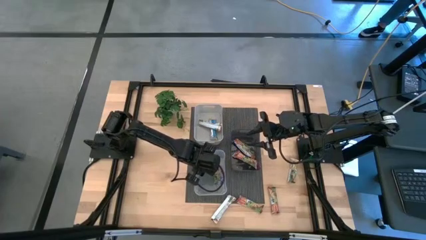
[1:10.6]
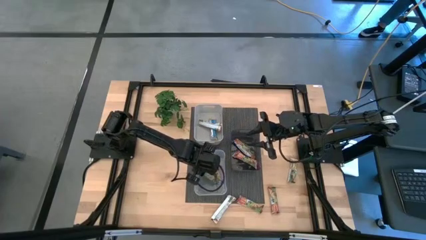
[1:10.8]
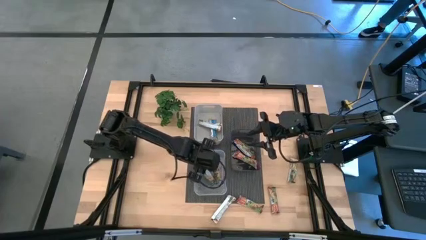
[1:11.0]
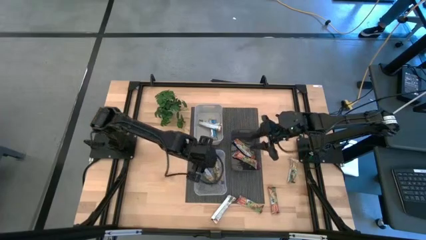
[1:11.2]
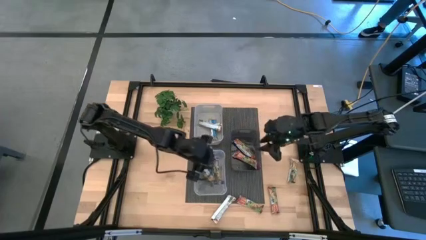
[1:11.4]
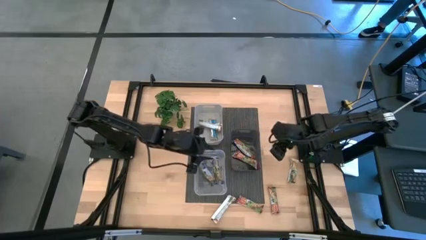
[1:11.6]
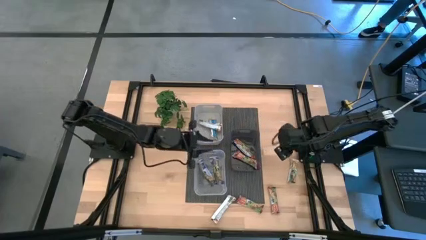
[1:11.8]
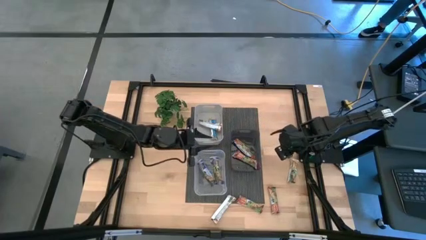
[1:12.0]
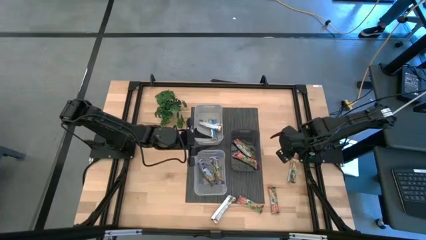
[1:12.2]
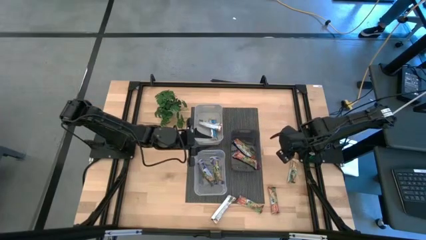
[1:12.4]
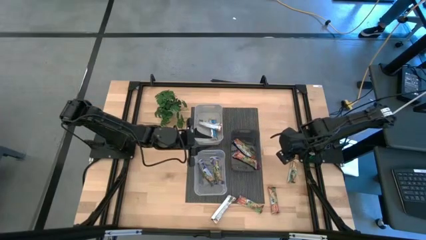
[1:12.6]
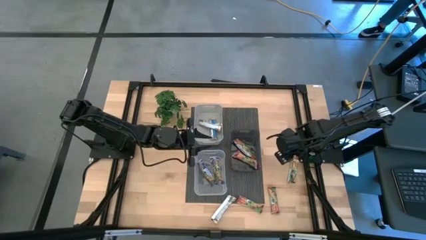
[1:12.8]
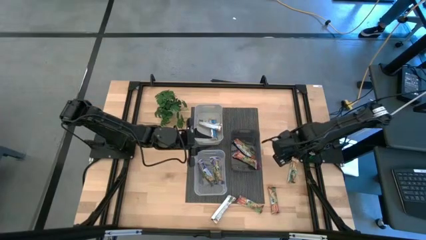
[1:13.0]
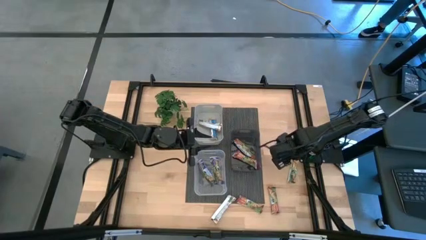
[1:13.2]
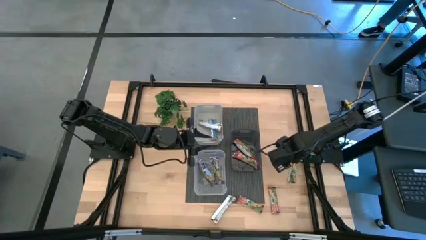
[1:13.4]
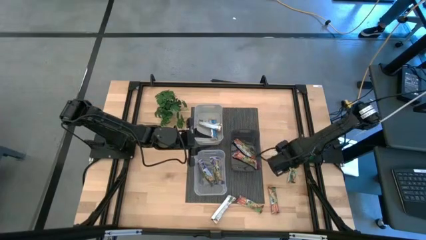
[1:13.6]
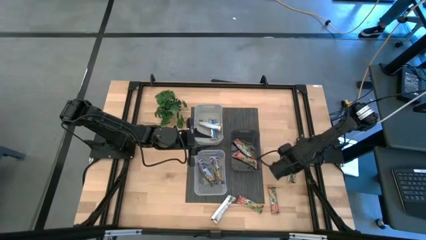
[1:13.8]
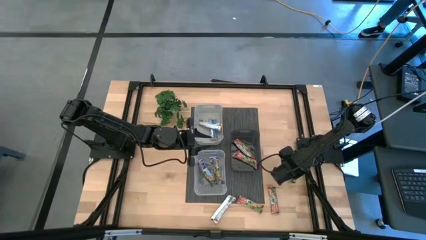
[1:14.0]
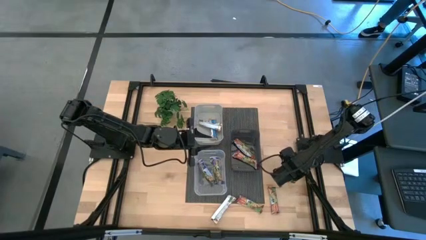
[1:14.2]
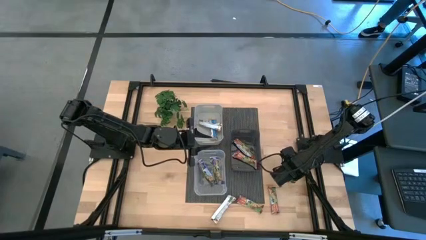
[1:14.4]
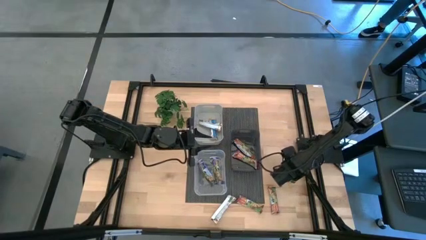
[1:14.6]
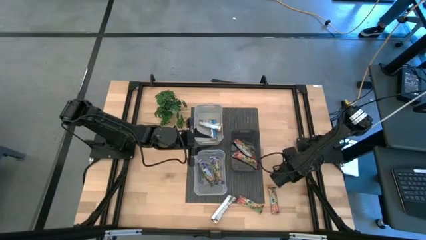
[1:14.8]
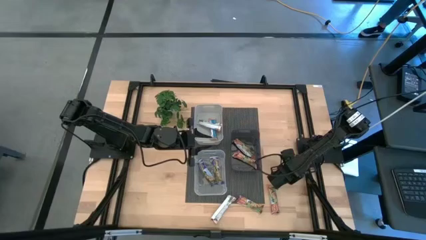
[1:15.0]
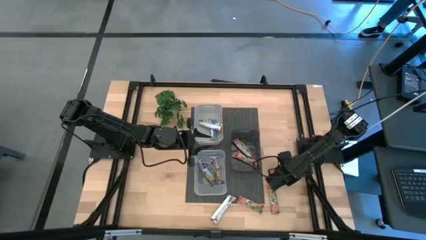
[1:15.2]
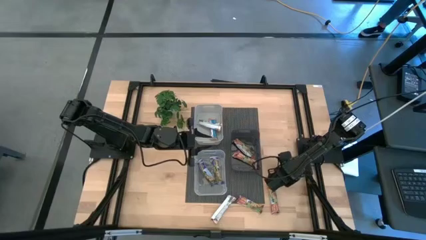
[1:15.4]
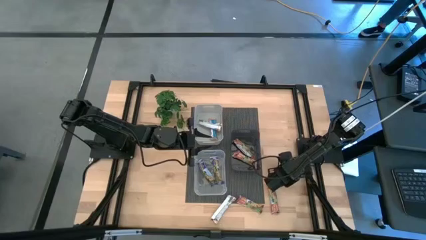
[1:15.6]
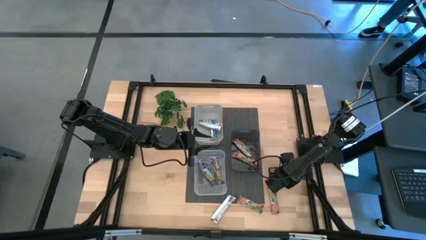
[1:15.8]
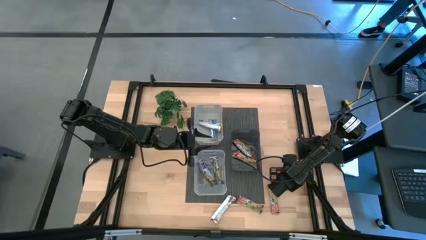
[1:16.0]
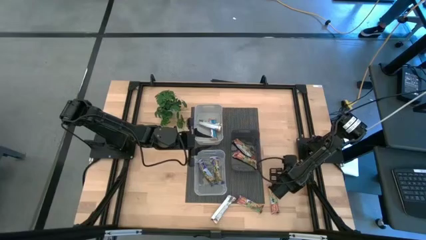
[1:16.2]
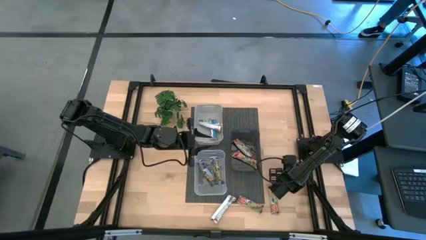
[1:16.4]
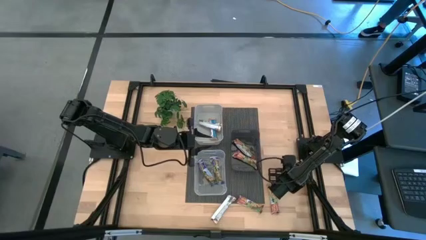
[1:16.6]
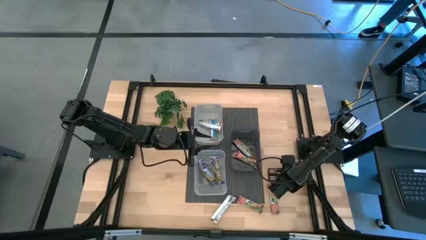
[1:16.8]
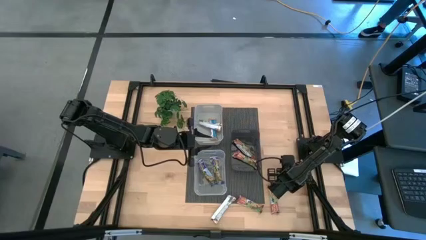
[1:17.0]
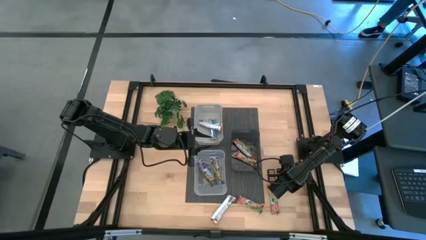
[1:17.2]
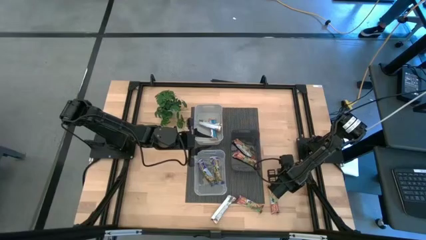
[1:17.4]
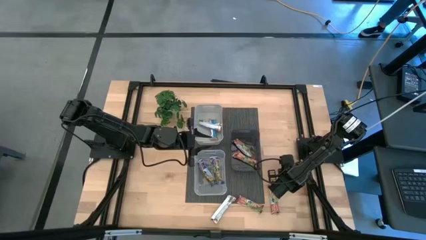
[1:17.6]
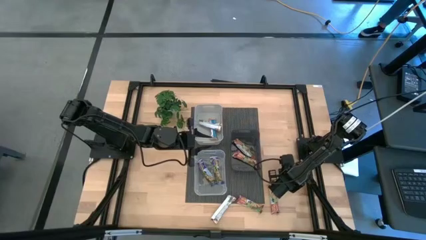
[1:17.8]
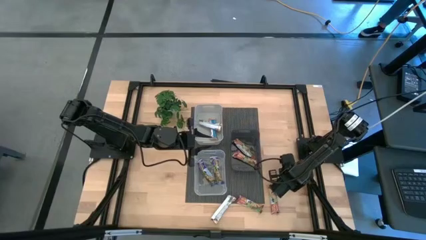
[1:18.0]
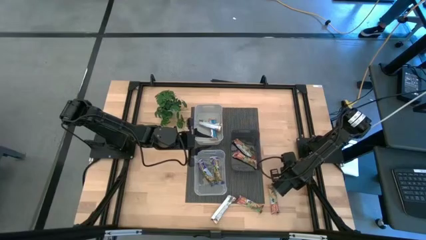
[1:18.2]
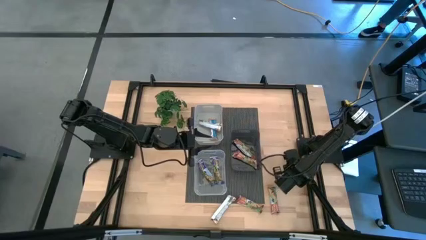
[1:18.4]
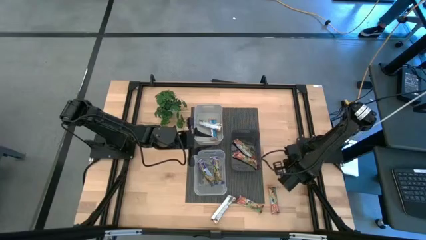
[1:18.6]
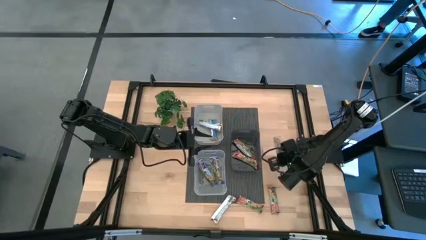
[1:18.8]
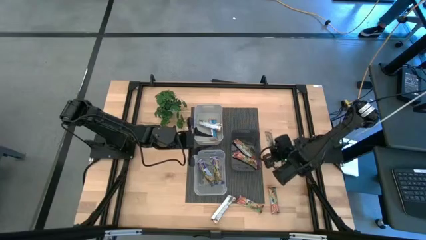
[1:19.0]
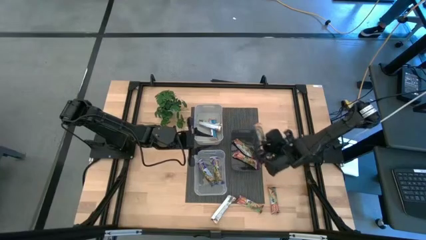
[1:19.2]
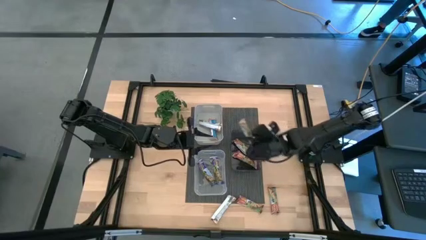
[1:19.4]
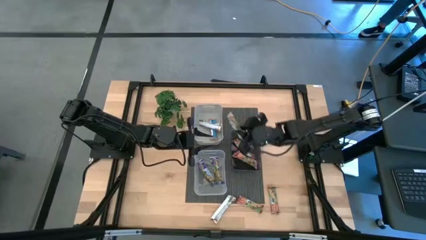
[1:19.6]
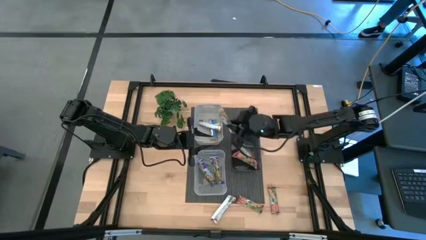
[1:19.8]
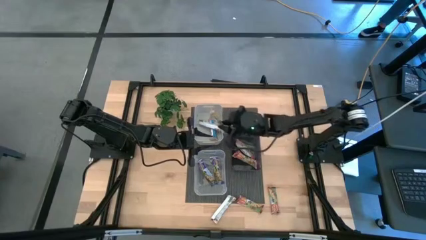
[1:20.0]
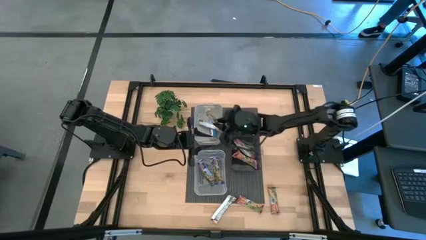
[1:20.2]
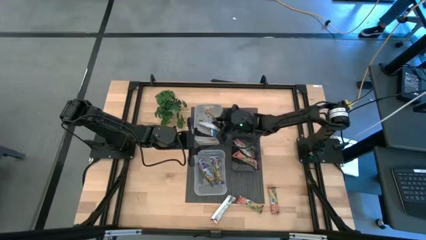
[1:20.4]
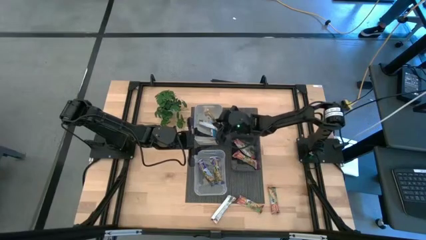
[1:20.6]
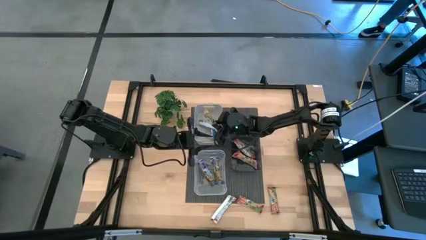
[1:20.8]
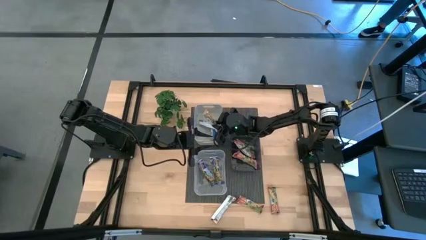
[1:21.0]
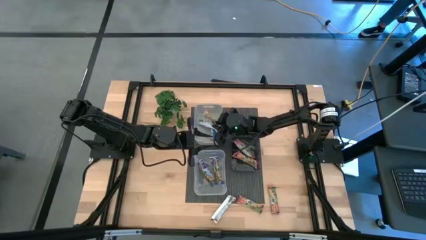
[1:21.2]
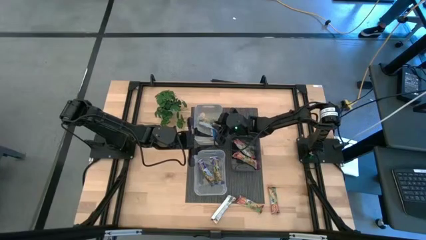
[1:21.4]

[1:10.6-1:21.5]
Task: Pick and place Granola Bars by type
Put the yellow granola bar into the gray bin

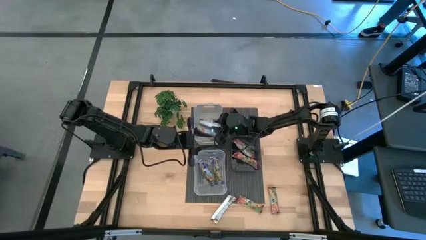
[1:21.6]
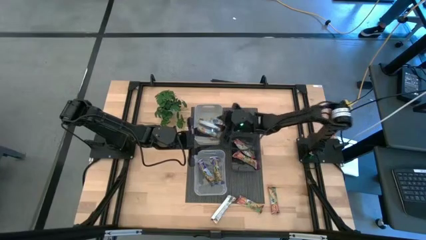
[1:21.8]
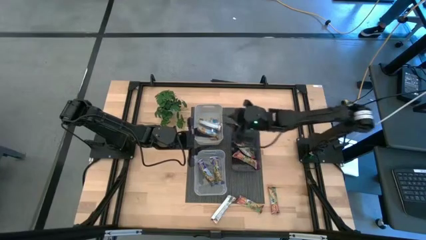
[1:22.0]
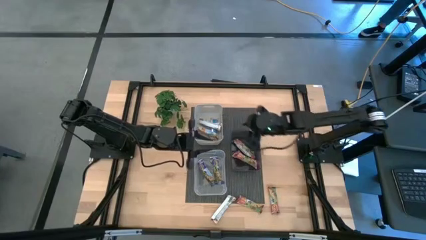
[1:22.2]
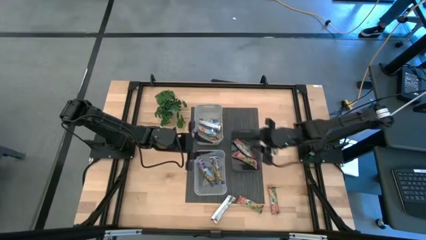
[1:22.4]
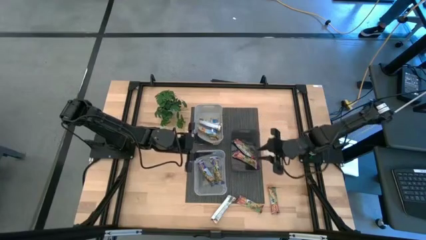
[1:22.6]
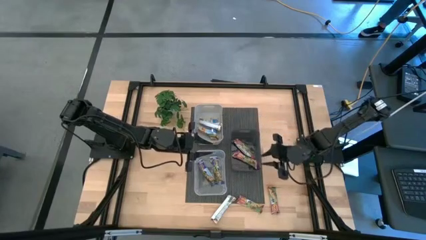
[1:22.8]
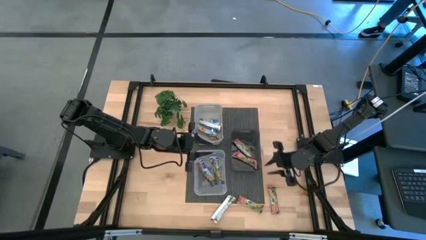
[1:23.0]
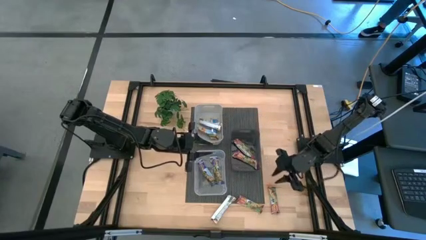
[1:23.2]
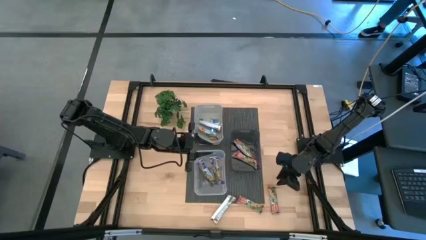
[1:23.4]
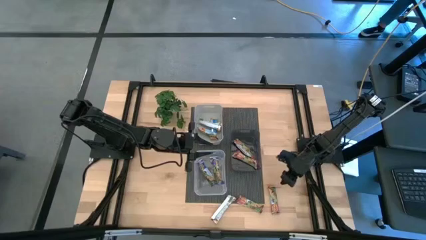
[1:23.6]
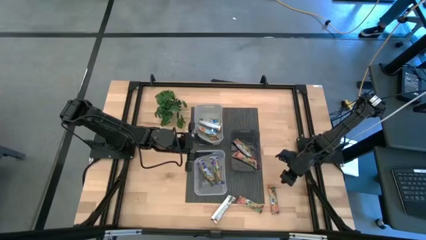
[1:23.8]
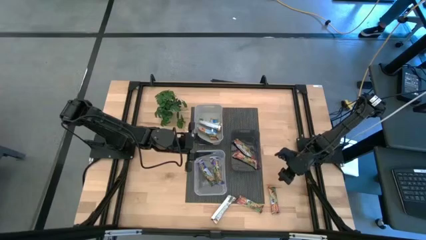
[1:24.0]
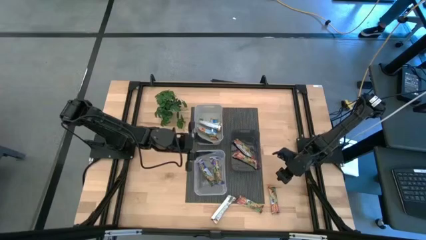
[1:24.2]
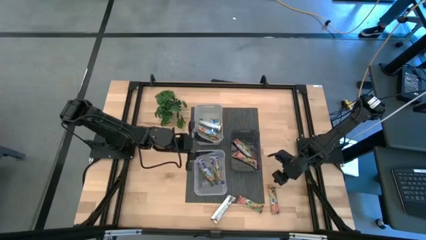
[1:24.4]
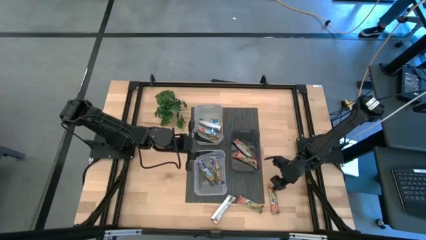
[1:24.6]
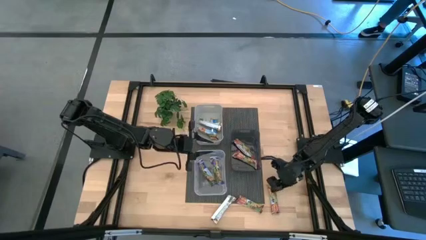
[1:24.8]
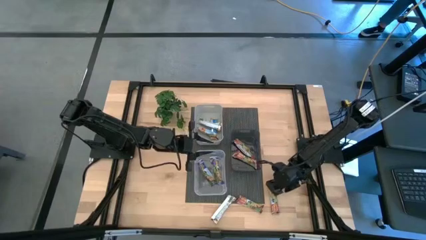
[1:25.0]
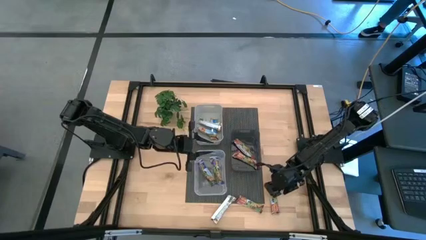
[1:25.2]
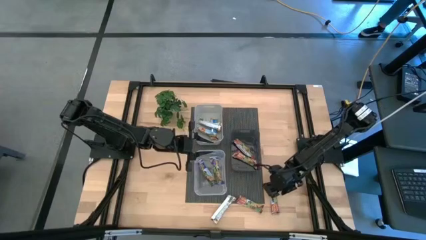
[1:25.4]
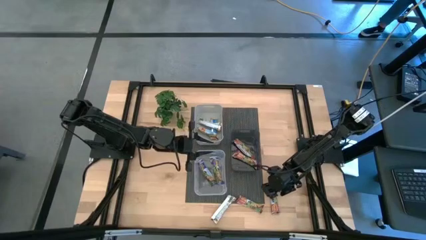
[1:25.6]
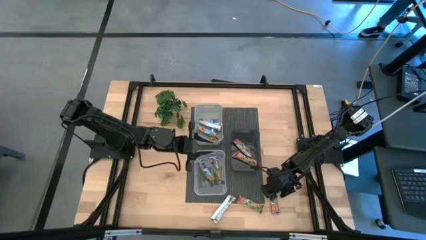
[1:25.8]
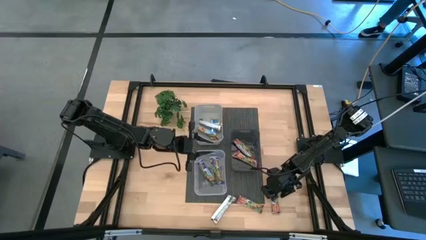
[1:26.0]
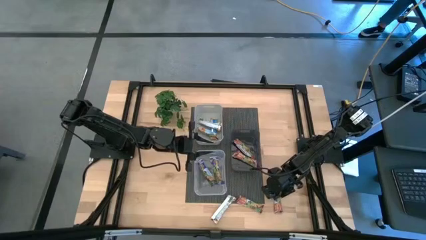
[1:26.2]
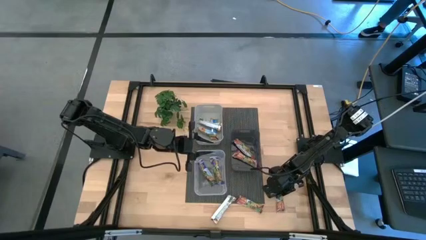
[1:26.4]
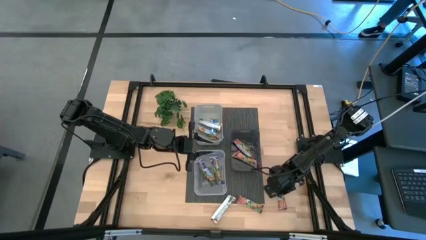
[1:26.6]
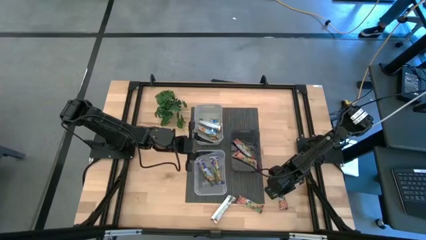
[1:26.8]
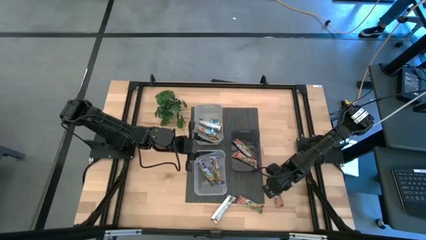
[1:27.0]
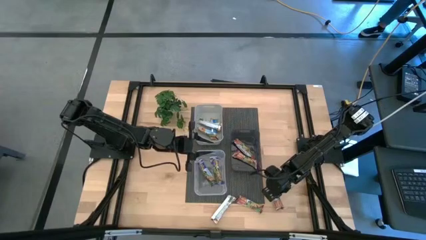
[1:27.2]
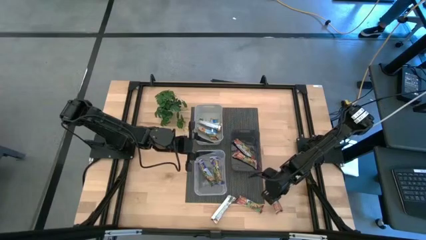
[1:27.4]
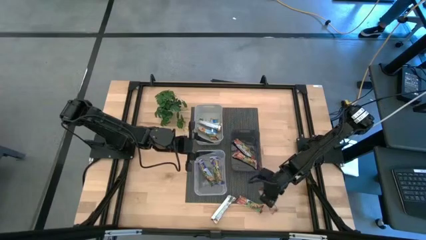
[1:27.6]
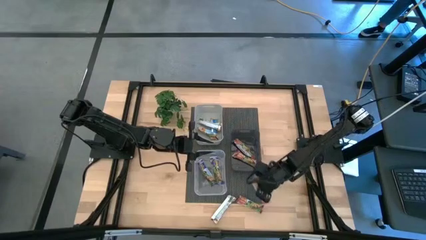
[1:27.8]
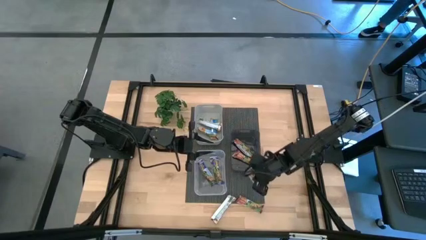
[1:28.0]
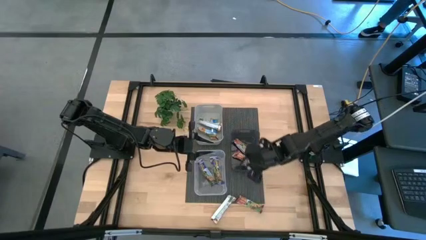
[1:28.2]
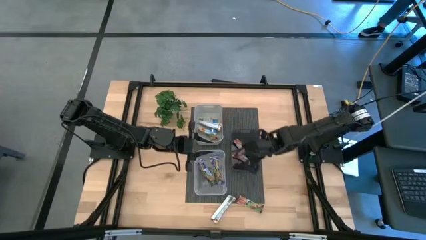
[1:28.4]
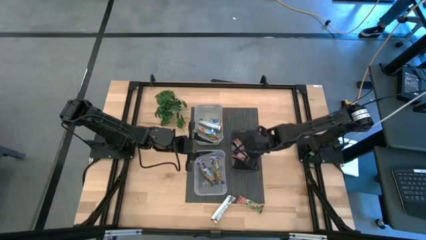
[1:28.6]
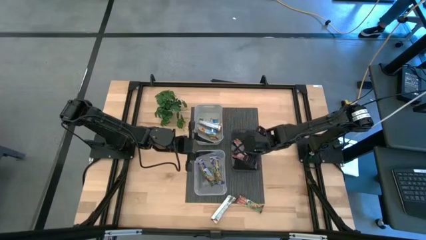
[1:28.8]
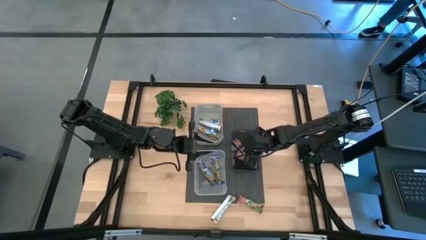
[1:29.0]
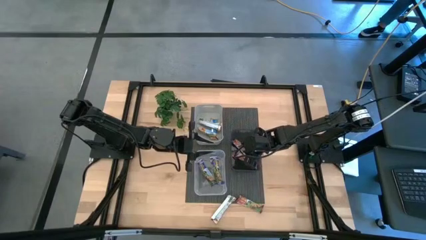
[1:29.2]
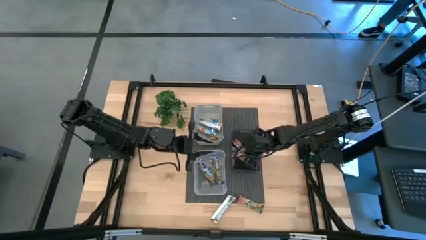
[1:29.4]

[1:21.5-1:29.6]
Put the red granola bar into the black bin
